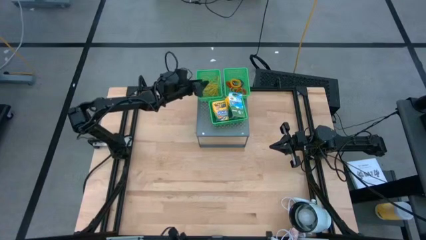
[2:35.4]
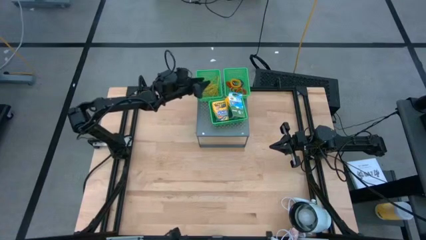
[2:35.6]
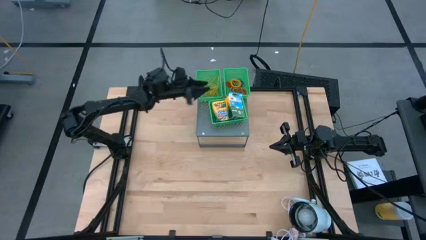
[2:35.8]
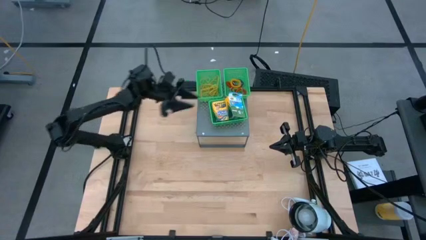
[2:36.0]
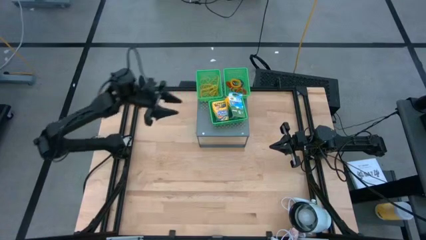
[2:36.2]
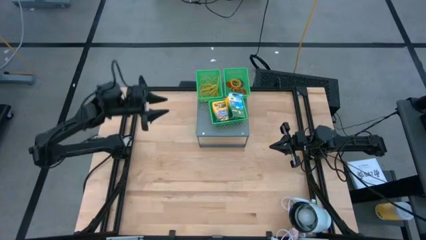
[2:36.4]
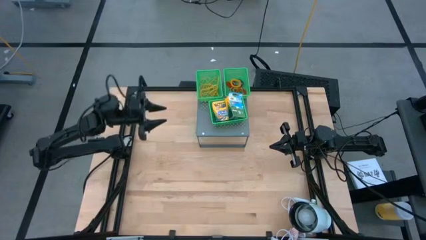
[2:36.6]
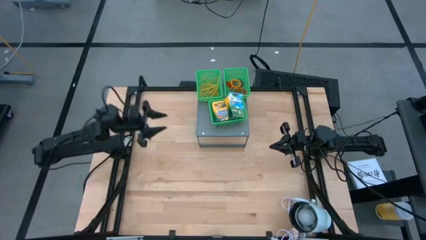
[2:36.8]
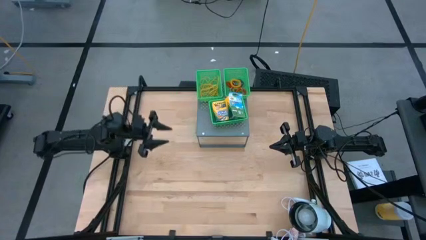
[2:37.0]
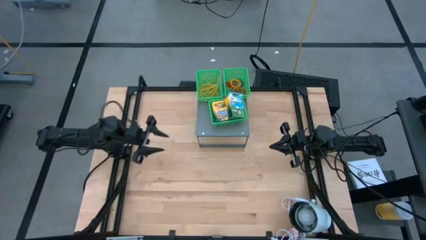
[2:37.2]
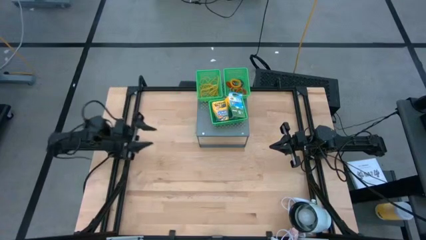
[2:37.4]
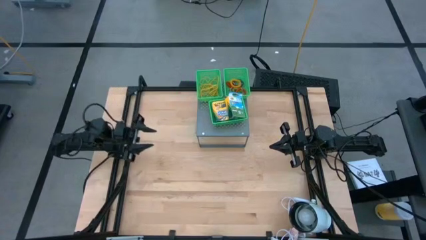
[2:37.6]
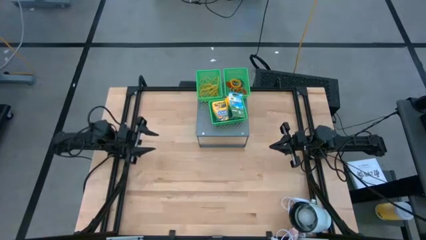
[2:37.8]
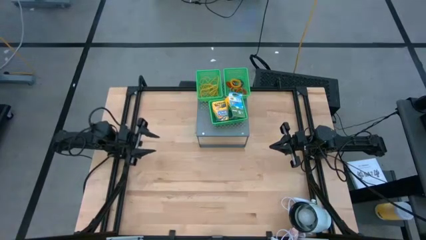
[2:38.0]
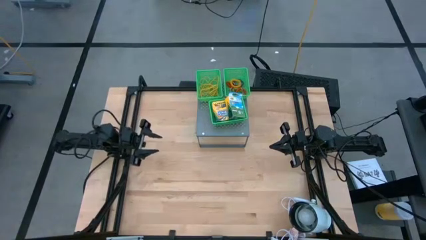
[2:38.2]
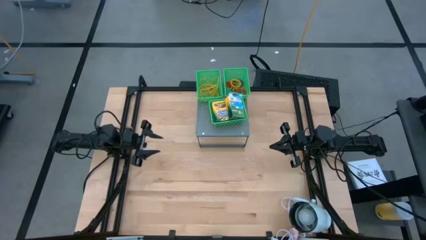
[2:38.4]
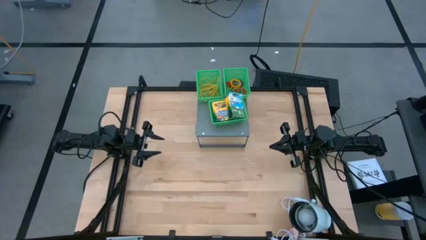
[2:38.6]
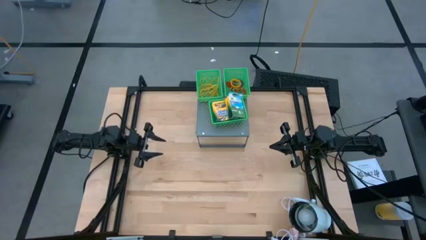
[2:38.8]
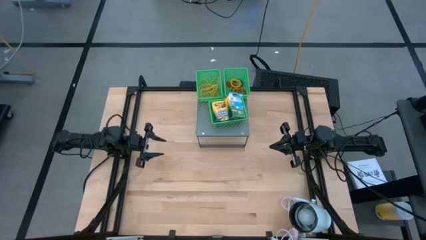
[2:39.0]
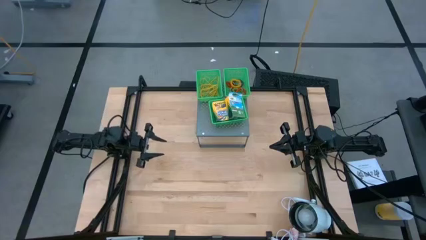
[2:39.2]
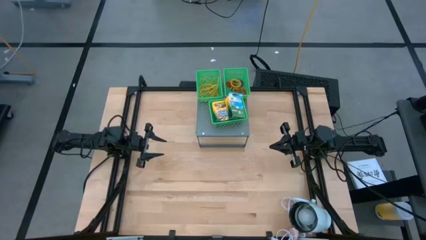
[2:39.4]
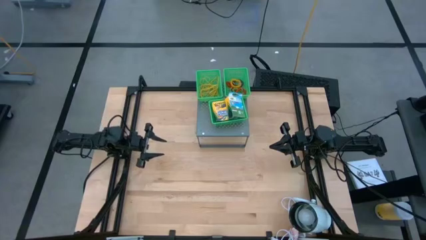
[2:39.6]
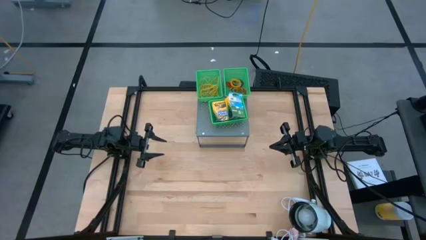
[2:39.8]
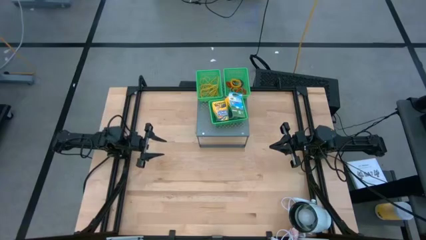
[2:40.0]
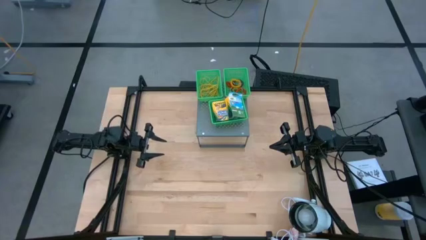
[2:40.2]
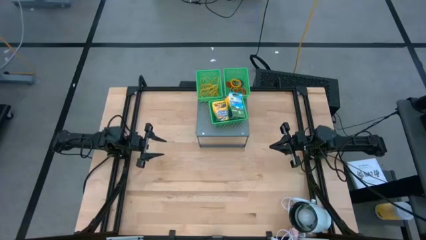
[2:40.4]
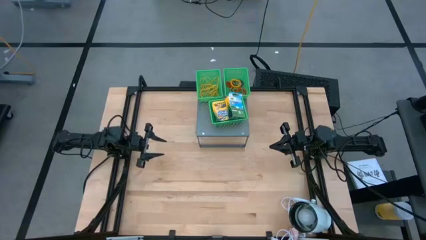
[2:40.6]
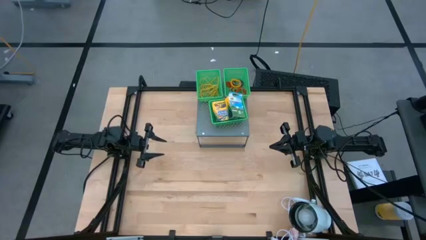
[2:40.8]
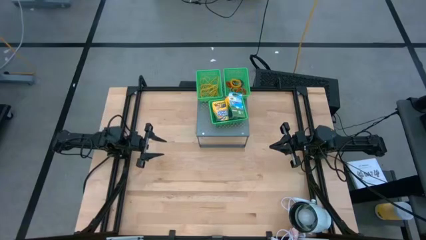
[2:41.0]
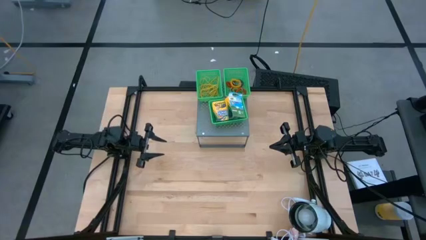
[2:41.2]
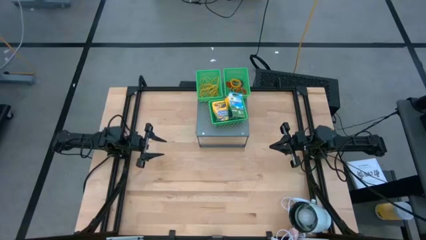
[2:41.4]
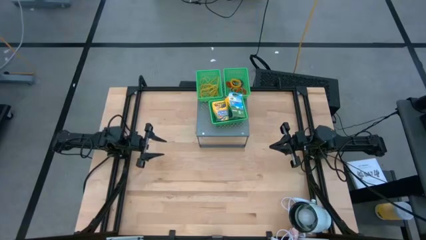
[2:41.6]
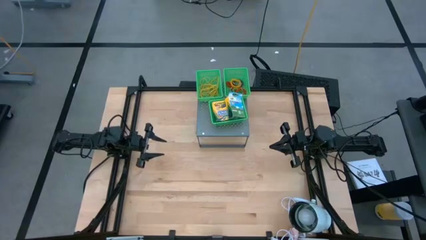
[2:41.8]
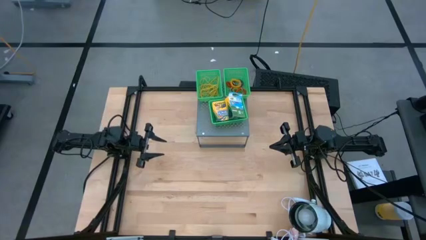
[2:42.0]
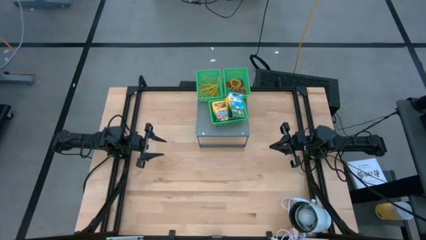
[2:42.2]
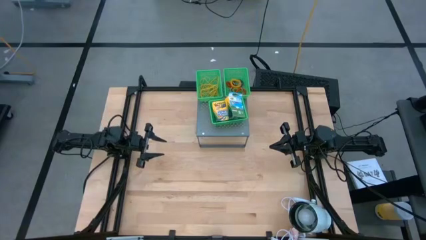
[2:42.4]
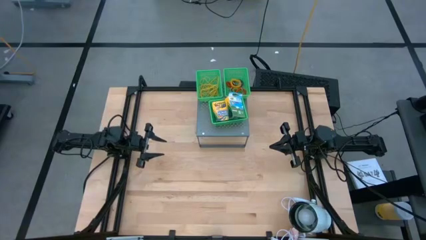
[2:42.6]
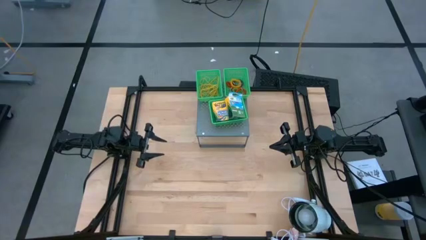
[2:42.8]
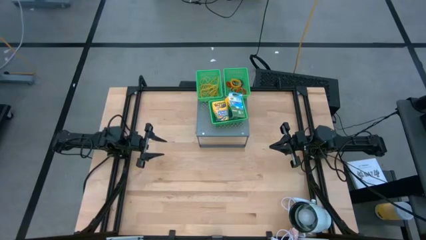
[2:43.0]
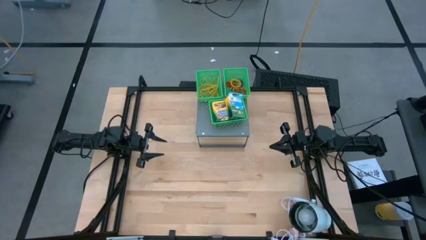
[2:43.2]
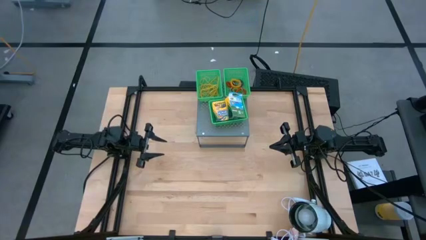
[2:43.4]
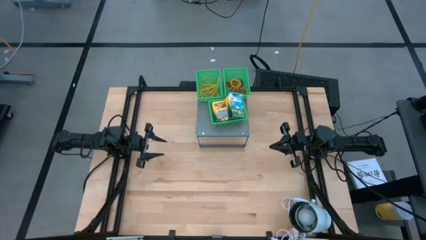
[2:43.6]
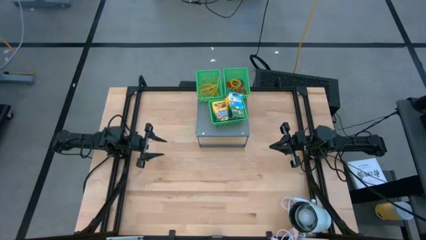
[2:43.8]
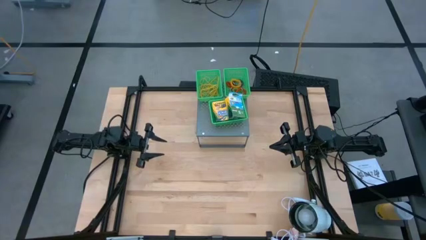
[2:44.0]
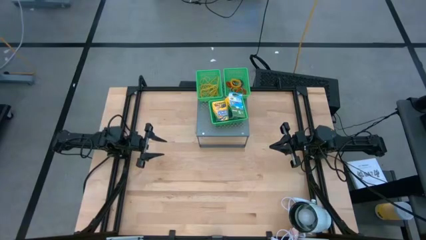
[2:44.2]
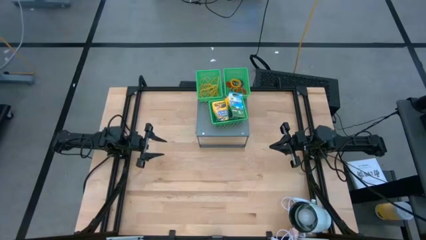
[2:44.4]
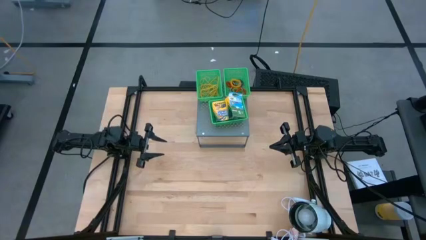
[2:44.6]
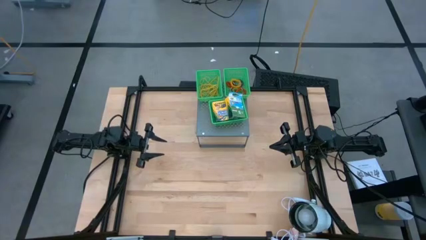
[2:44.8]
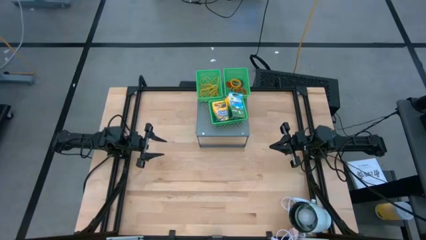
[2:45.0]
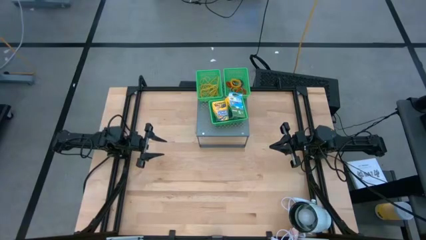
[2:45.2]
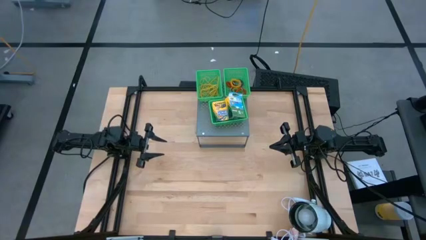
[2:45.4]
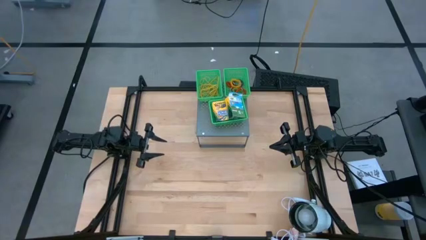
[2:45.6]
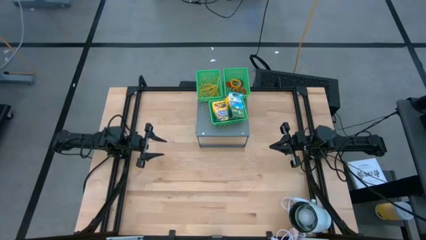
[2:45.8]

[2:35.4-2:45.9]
Task: Pick & Place Office Desk Supplies
Return to Home Position
